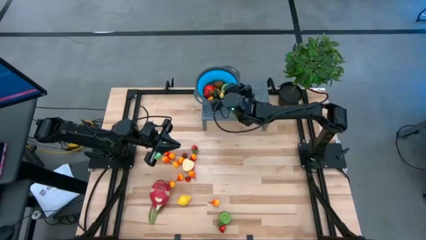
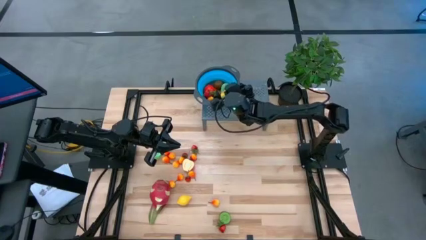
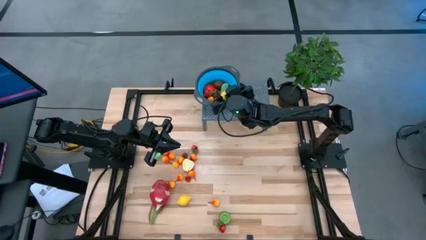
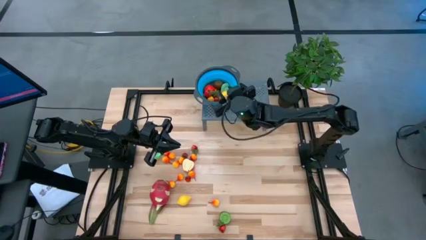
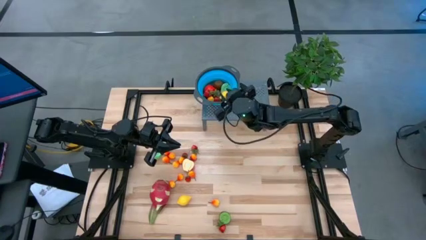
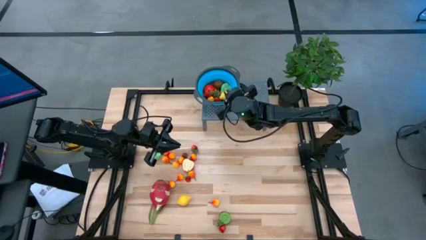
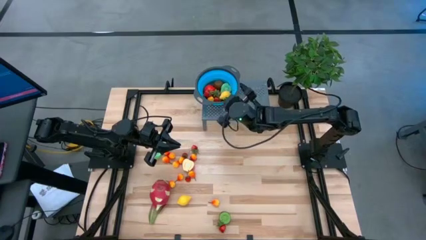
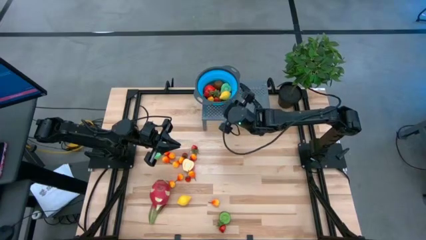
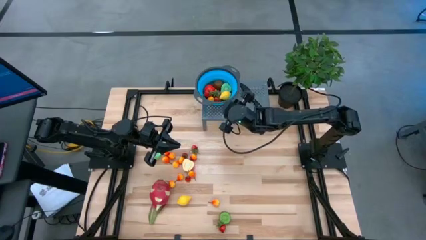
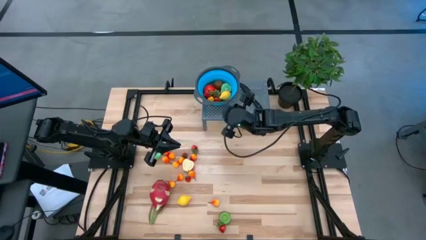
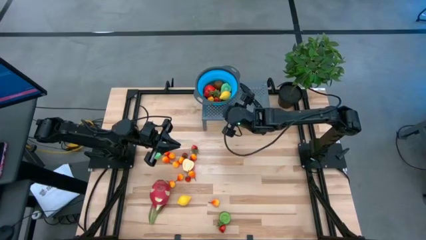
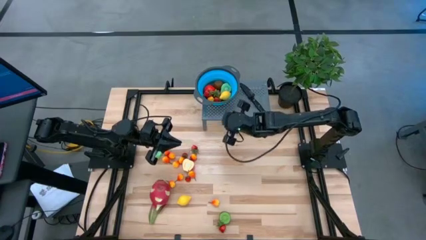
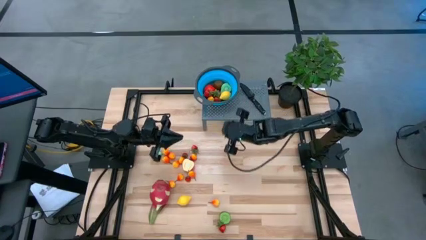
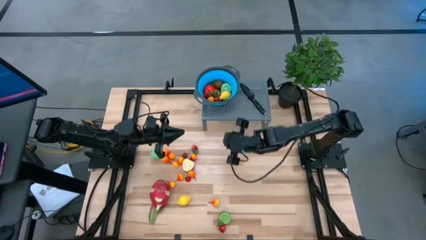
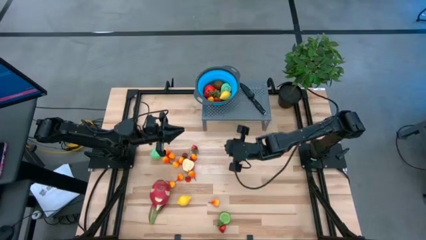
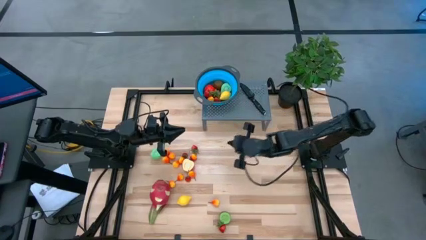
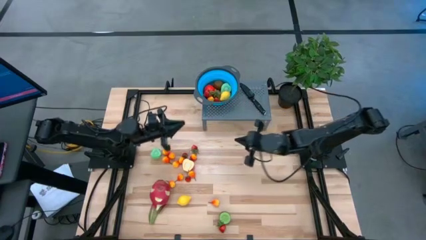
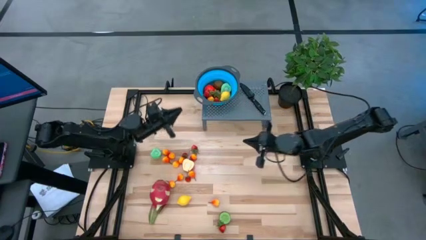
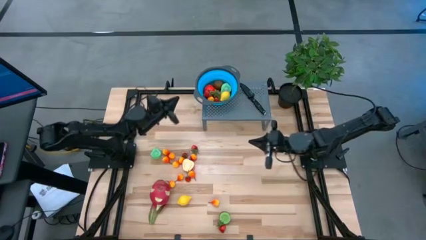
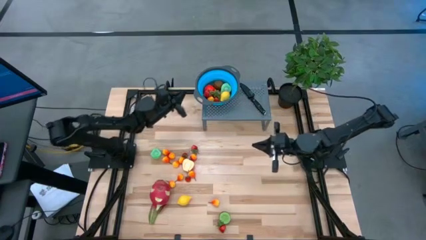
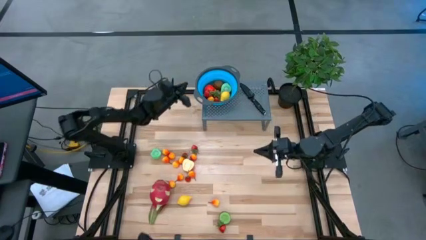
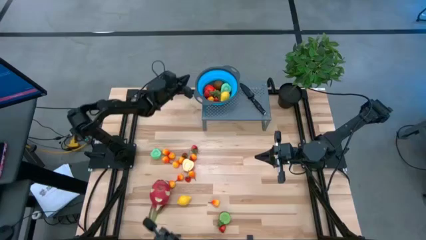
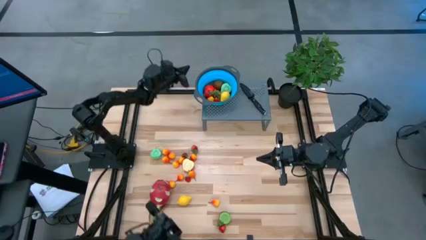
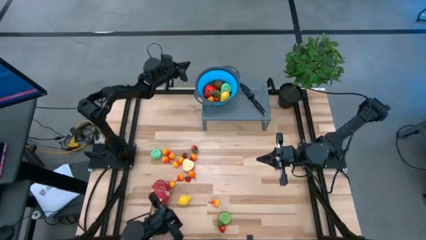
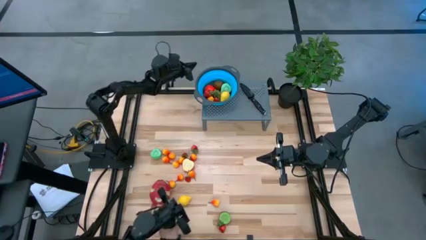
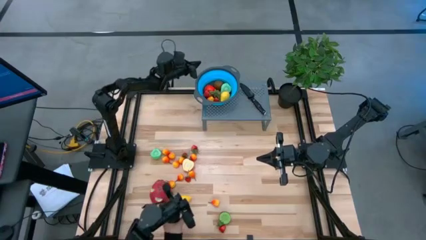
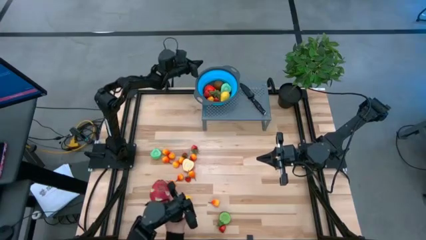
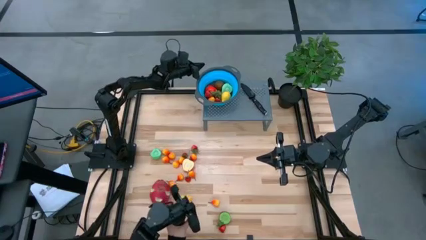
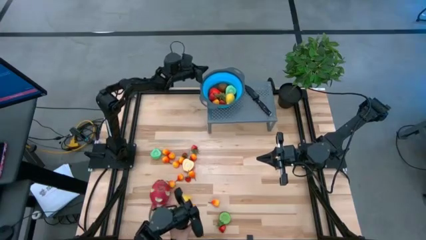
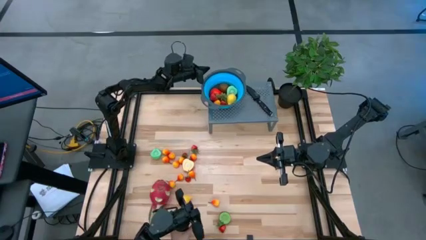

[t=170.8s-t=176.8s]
Task: Pick & Place Fruit
Adjust the shelf on the table

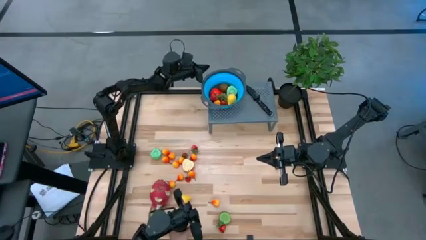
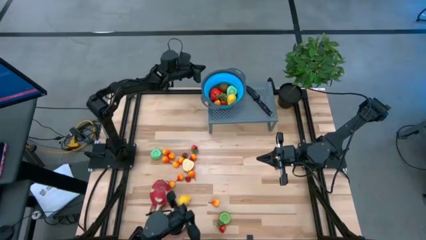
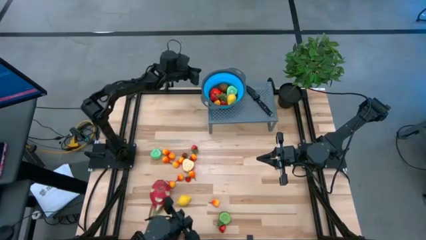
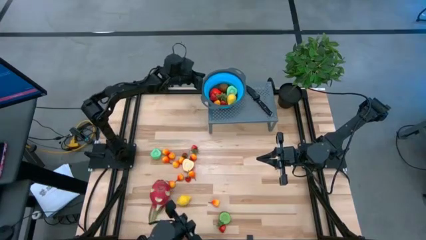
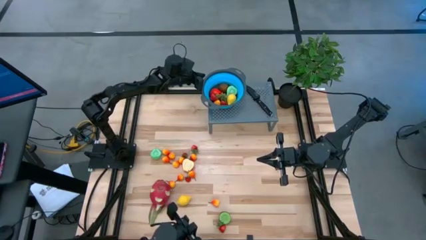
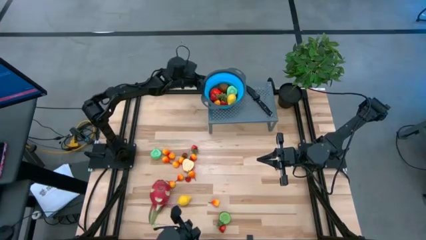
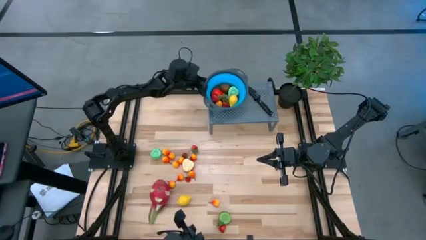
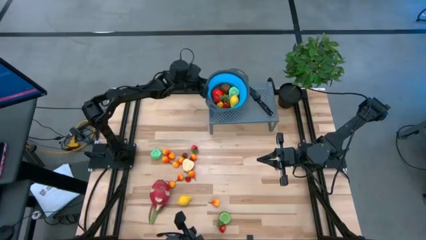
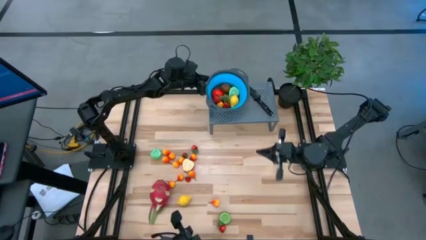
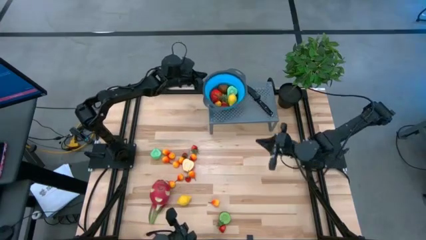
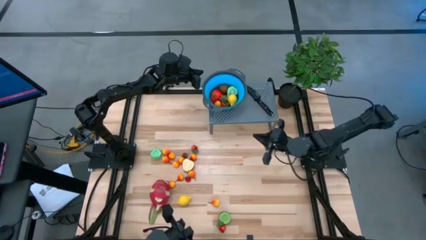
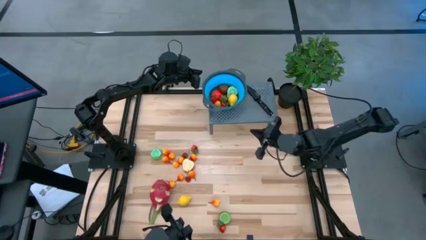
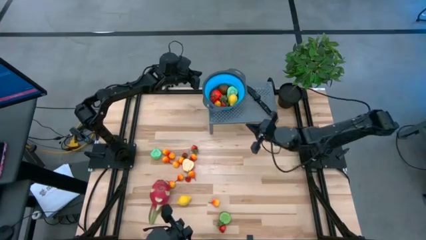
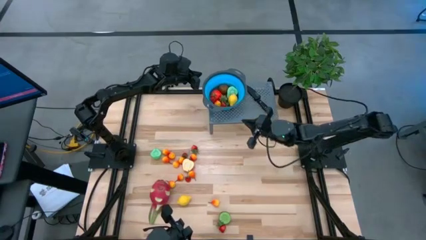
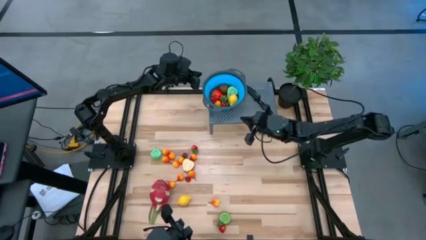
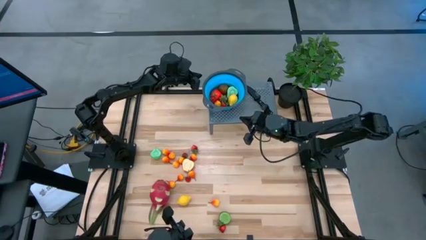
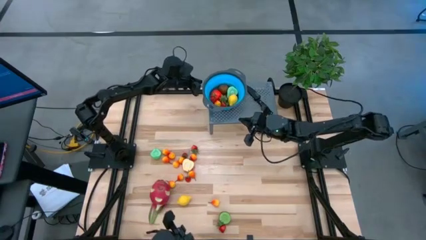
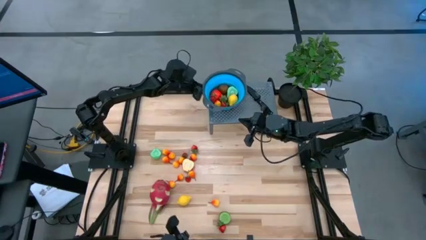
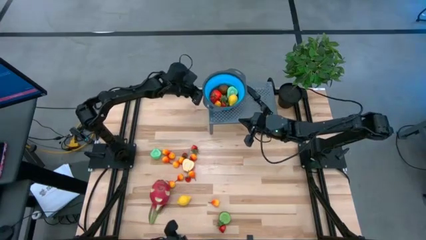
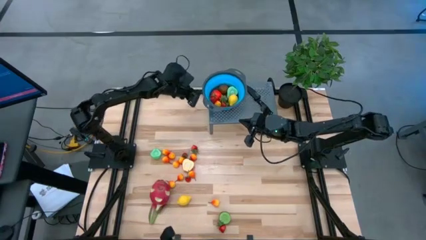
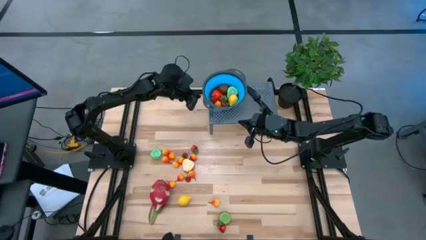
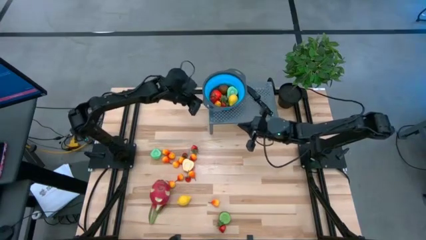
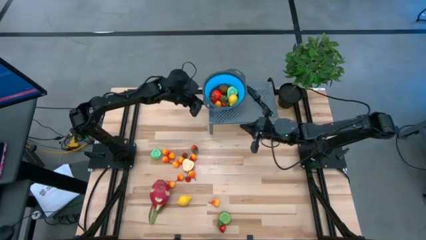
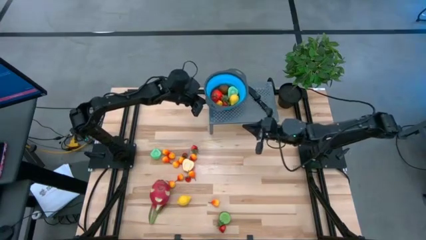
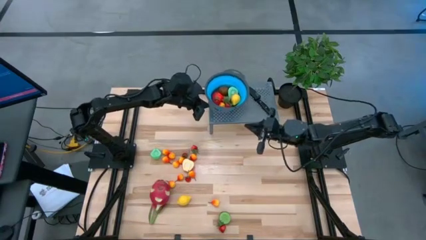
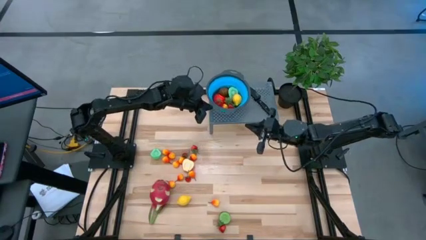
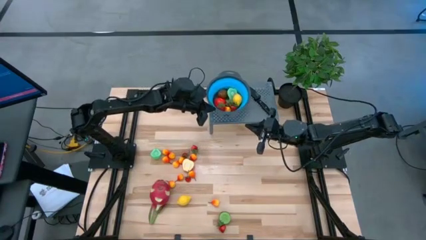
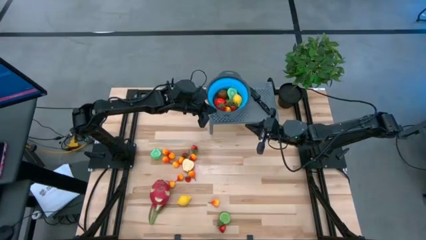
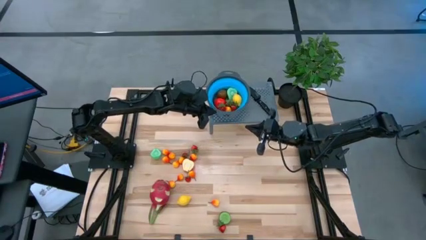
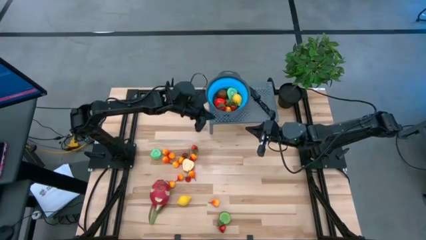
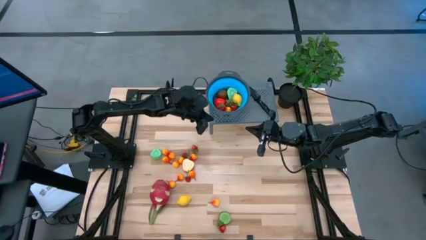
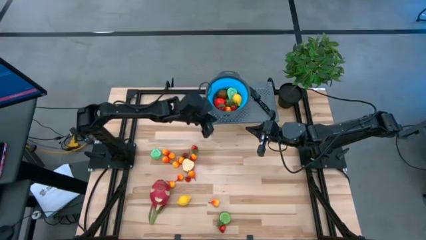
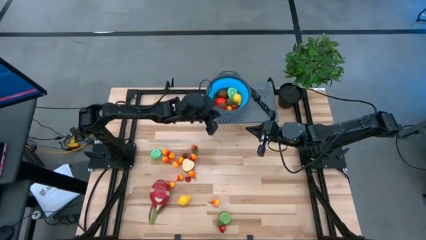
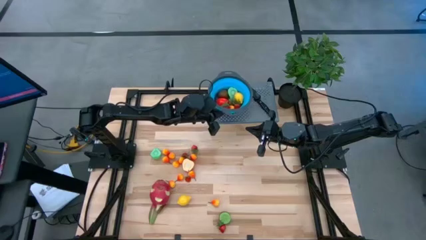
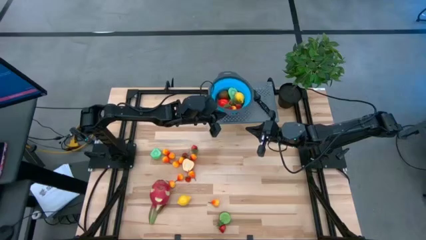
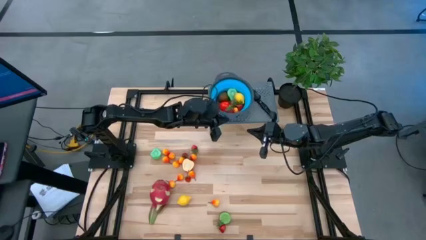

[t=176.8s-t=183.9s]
Adjust the strainer bowl on the table

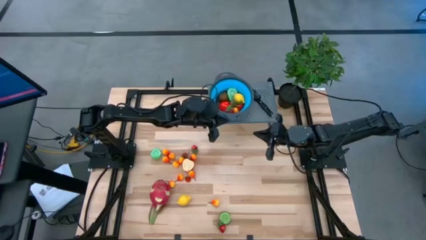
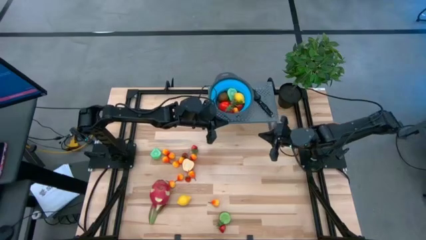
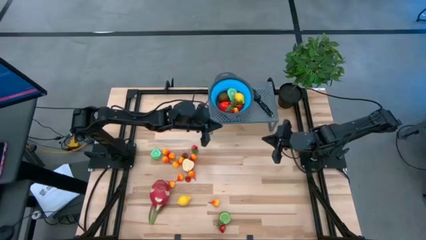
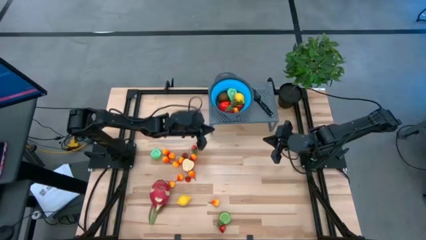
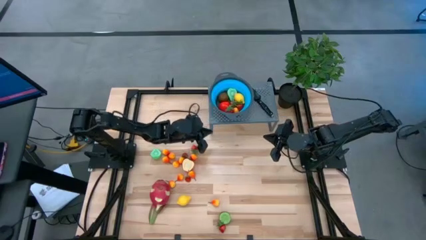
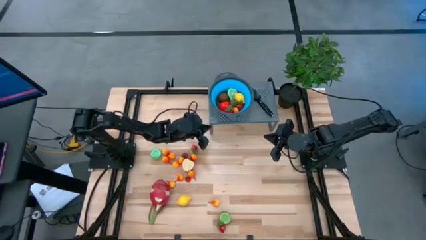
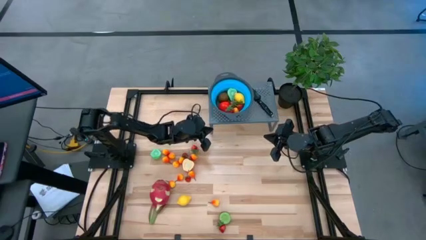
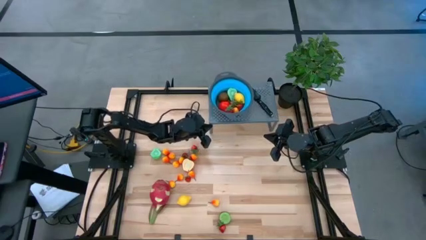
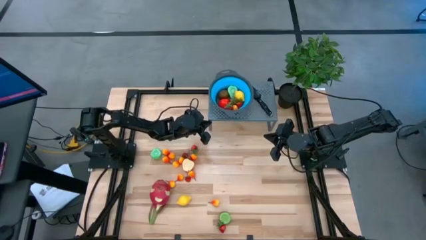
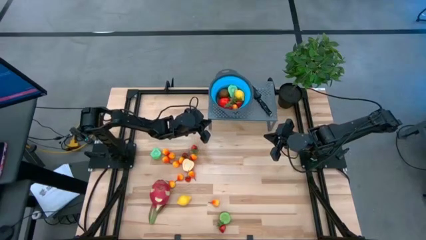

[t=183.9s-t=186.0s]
Adjust the shelf on the table

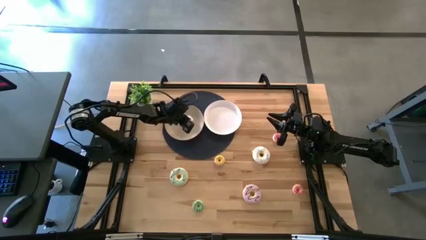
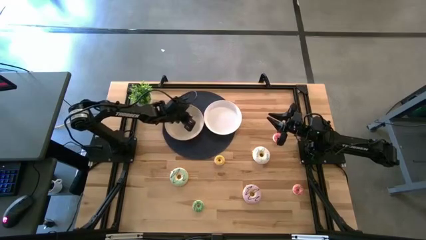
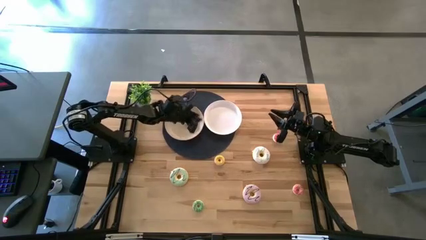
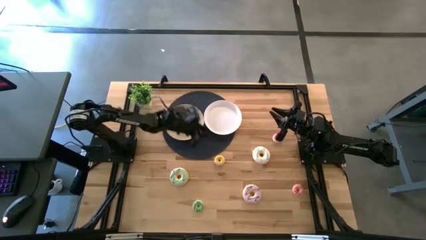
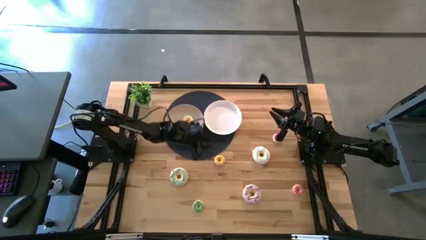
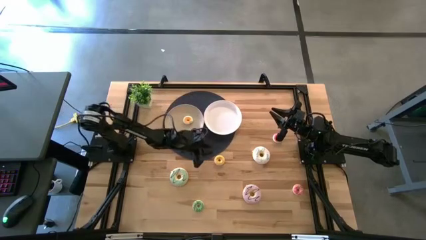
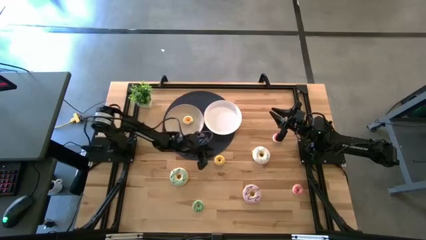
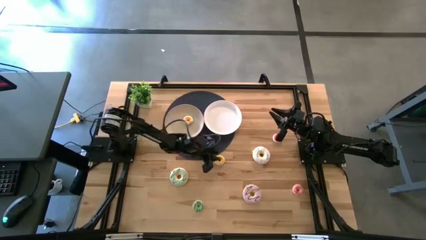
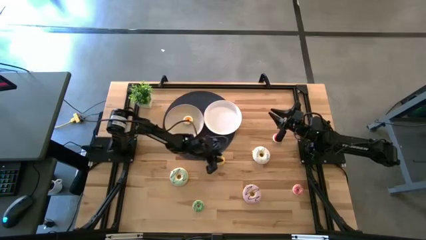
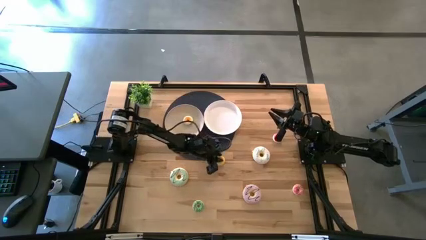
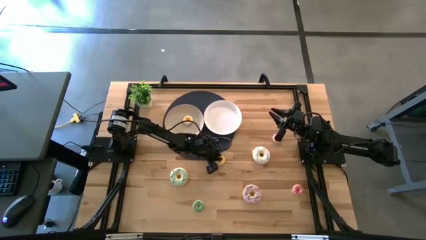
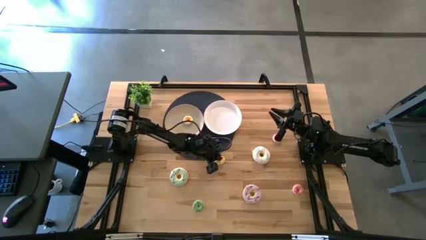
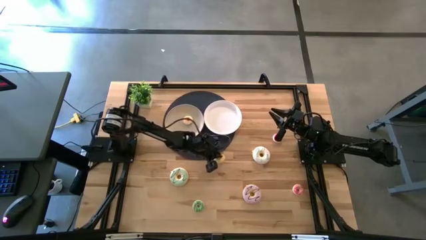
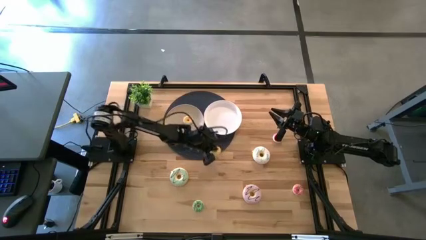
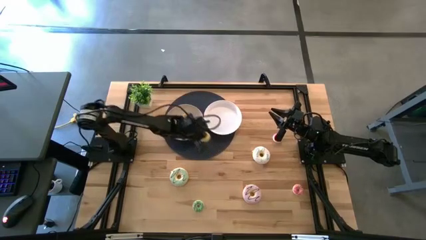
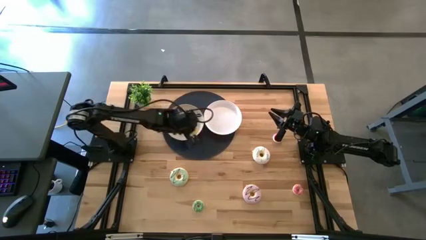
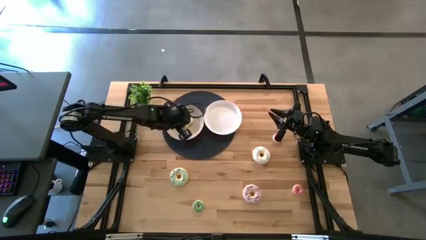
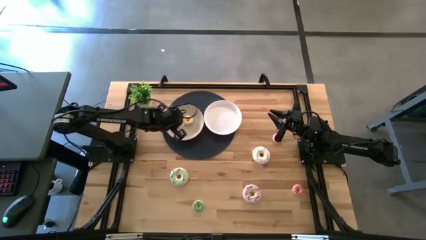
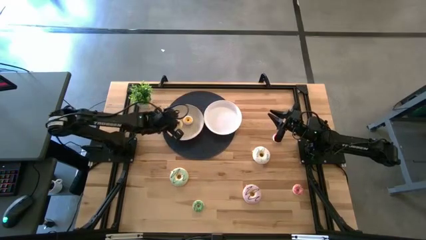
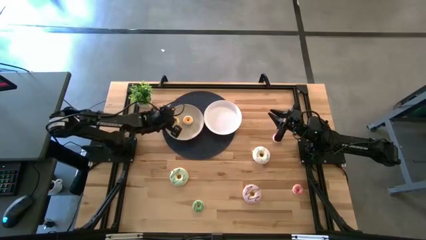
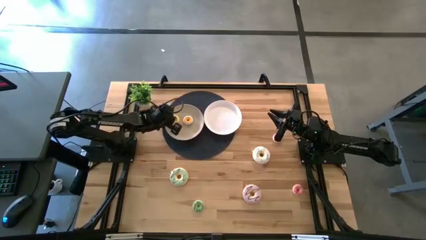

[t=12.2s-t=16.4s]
Task: Pick & Place donuts
Put the small yellow donut on the gray plate
